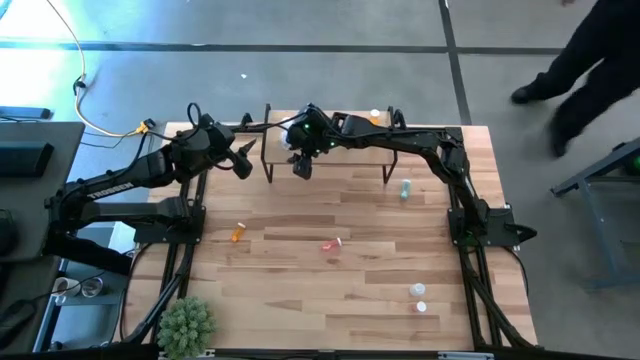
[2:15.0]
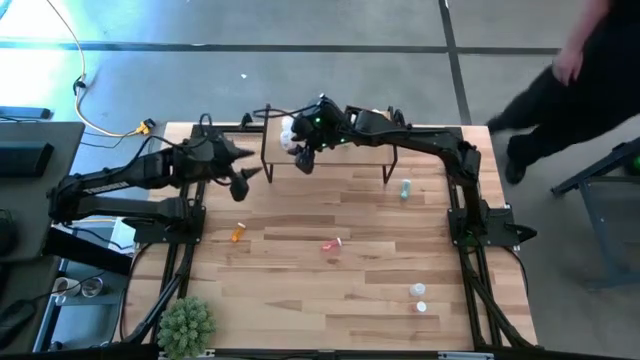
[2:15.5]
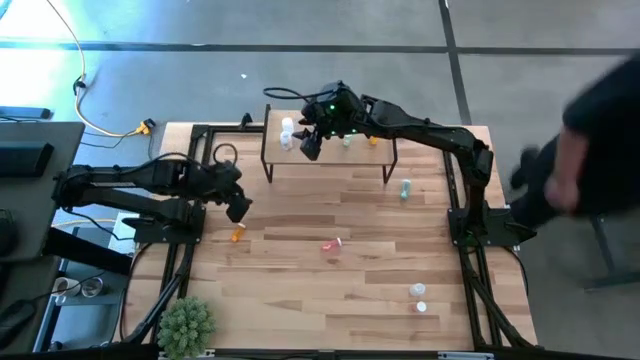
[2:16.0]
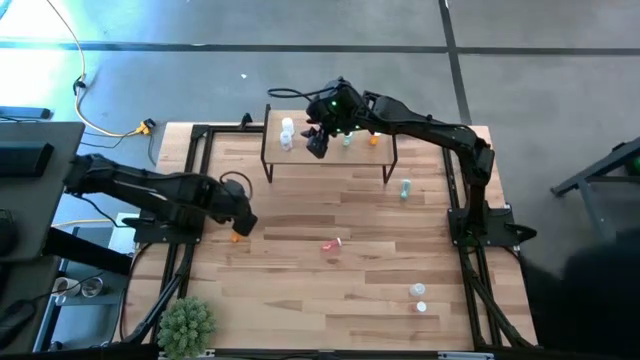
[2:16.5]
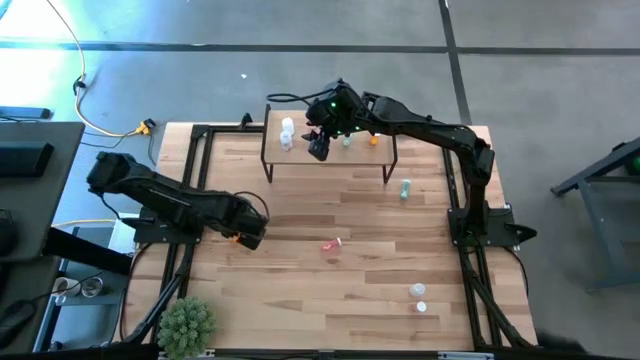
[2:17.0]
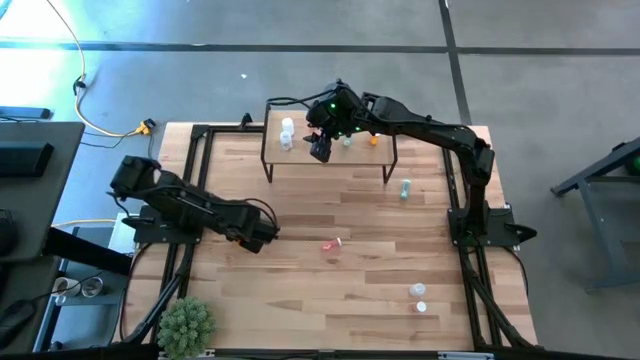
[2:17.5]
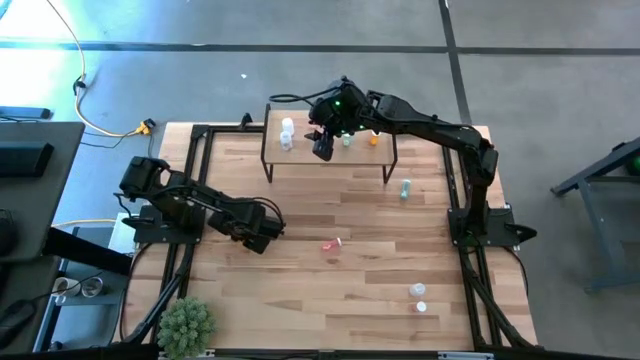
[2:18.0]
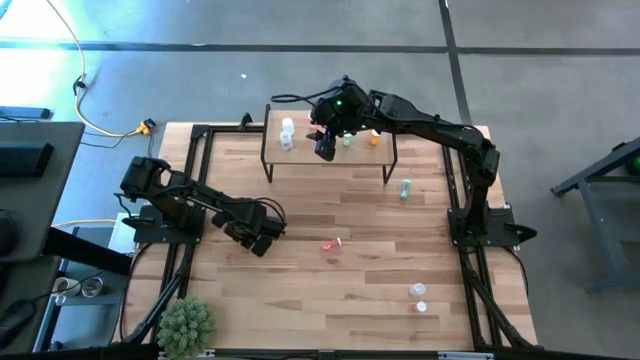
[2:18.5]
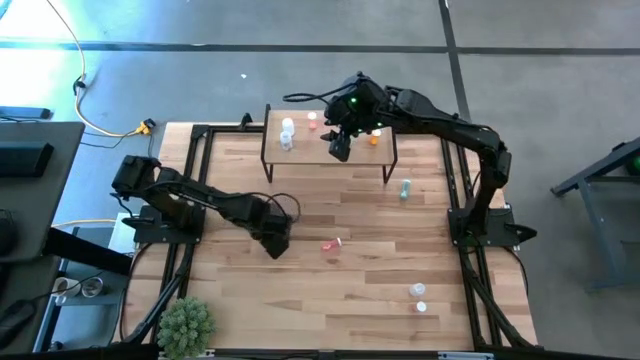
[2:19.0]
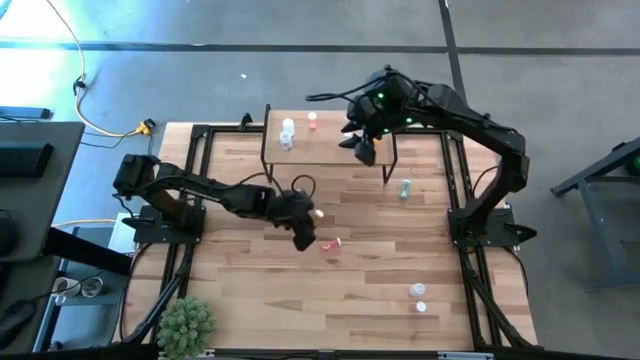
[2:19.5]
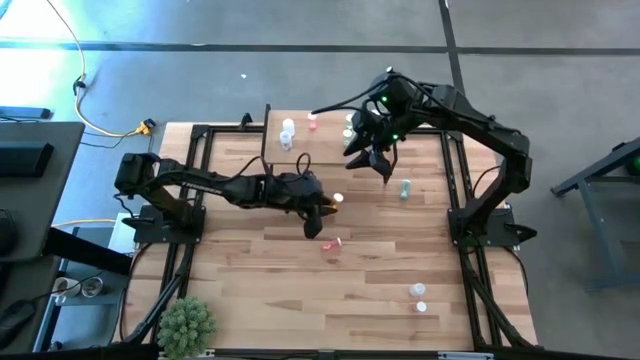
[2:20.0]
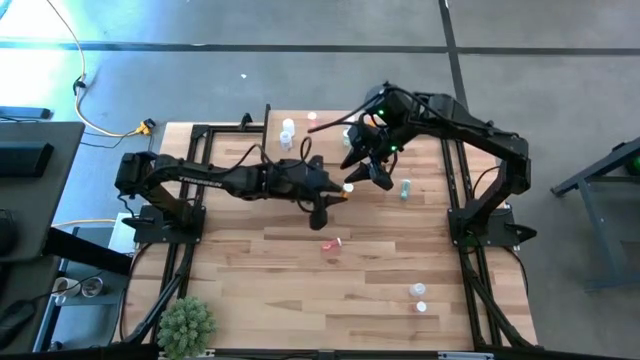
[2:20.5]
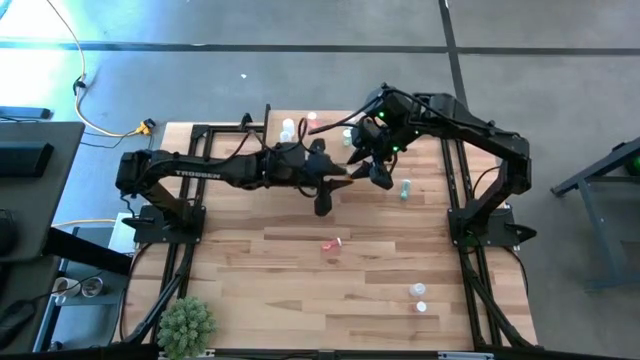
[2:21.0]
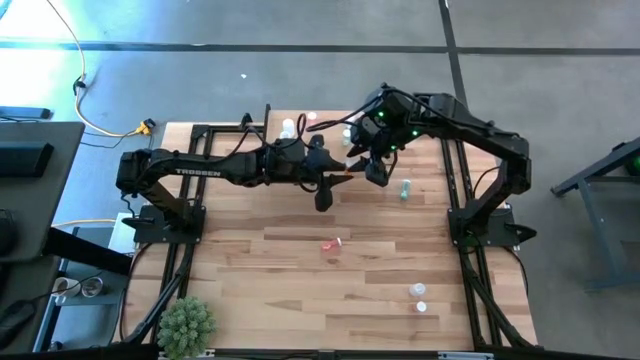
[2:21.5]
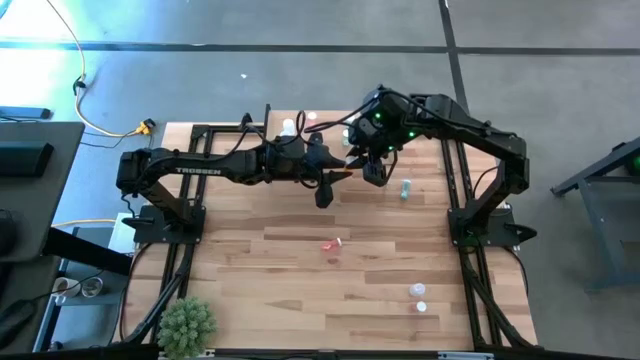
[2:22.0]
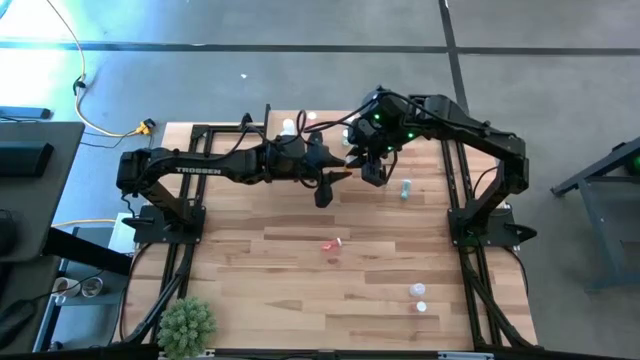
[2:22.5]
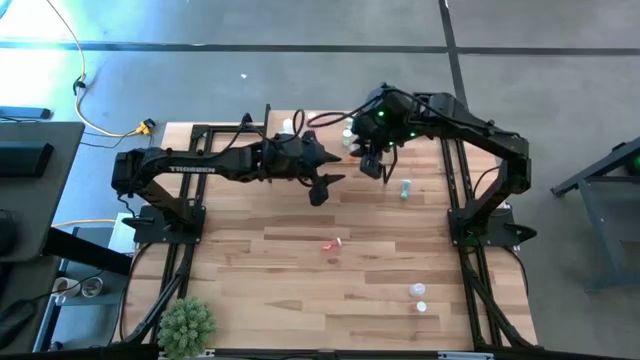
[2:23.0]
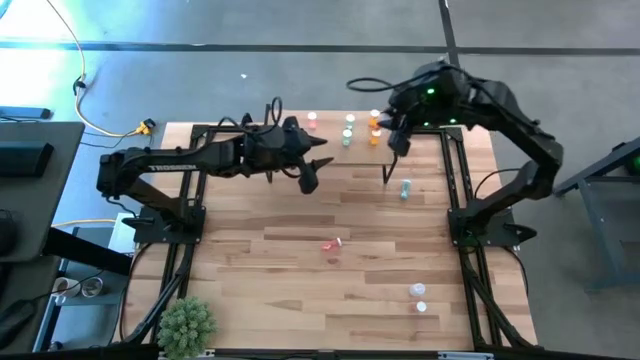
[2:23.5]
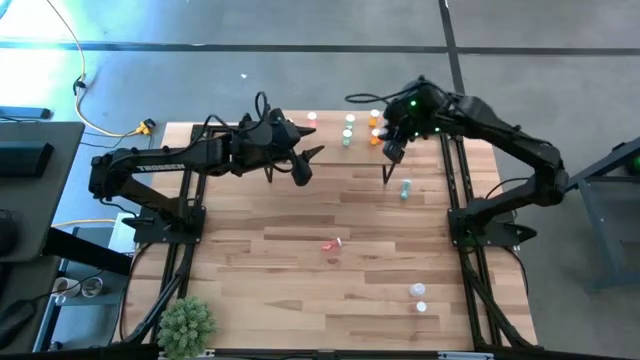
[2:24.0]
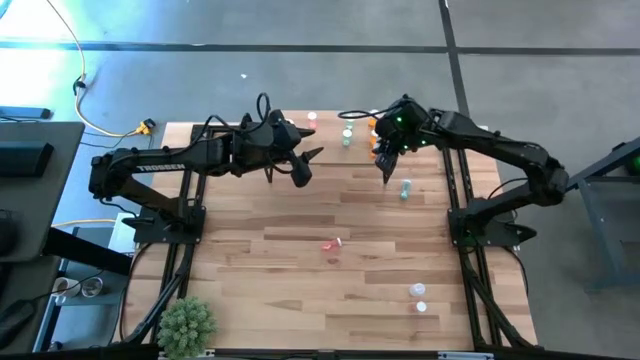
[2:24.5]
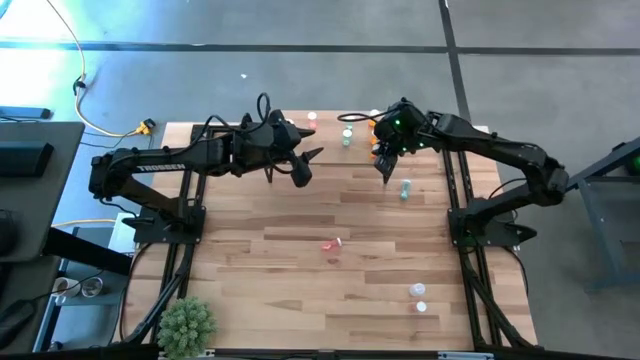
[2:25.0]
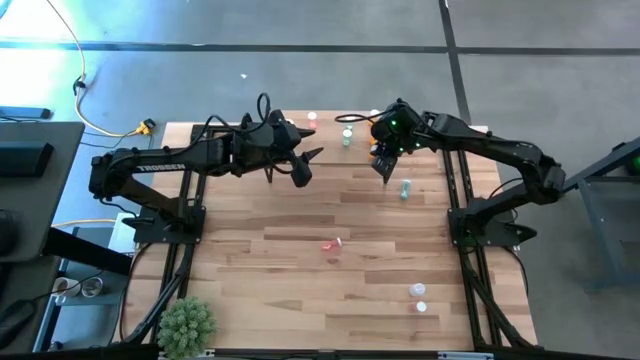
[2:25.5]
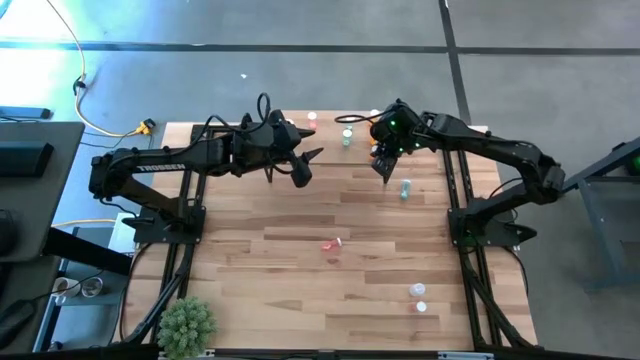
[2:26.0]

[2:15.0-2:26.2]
Task: Pick and place medicine bottles onto shelf by color
Put the yellow pill bottle on the shelf aligned with the other yellow pill bottles

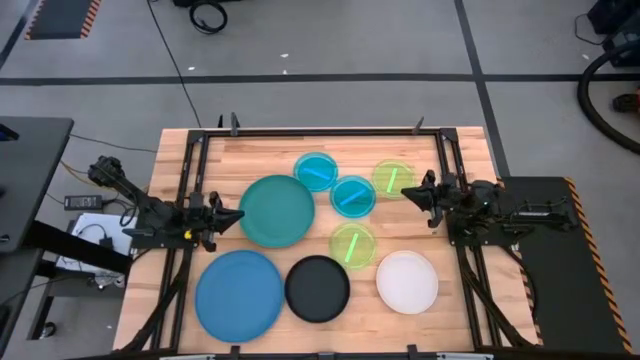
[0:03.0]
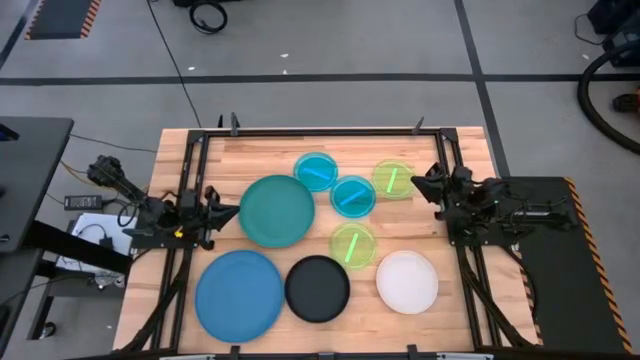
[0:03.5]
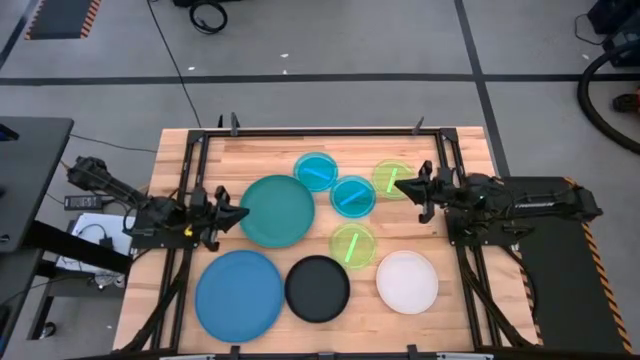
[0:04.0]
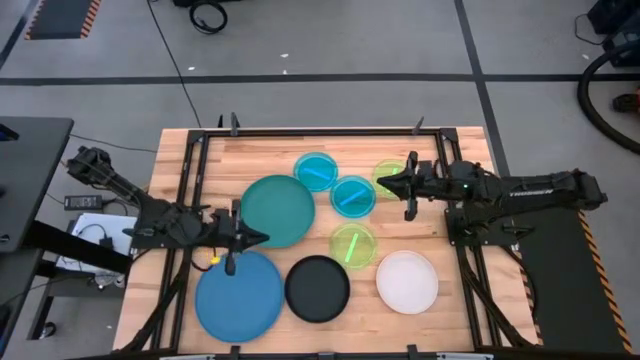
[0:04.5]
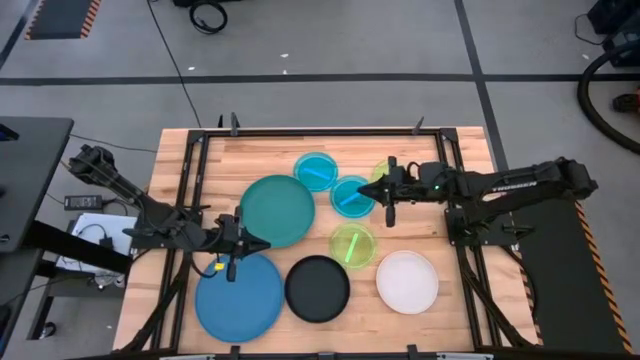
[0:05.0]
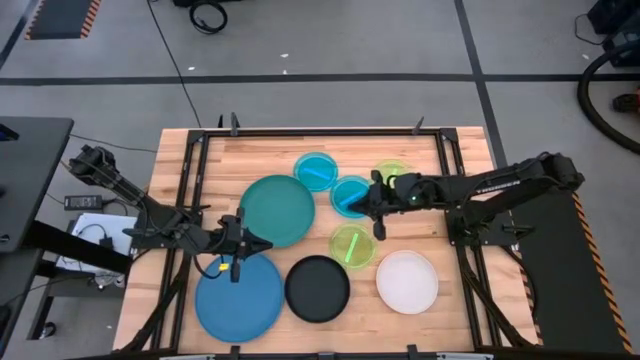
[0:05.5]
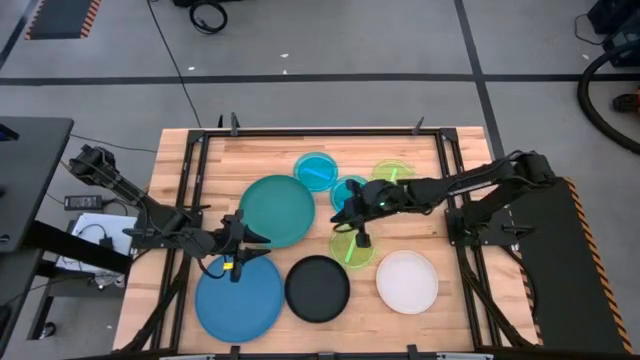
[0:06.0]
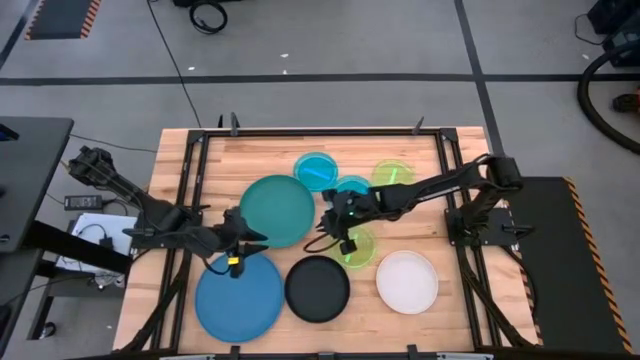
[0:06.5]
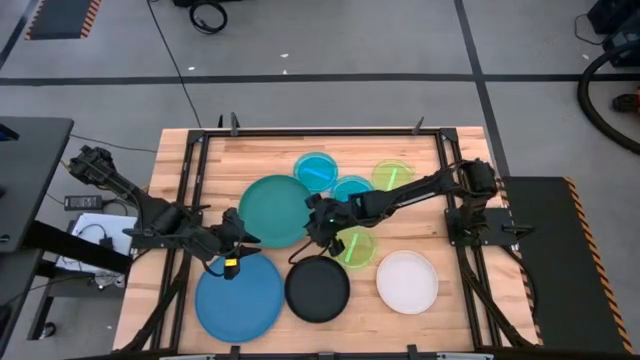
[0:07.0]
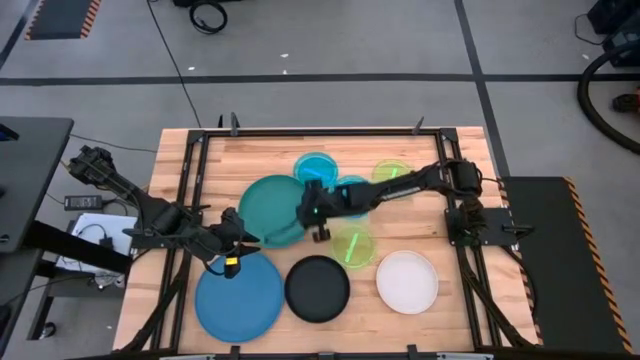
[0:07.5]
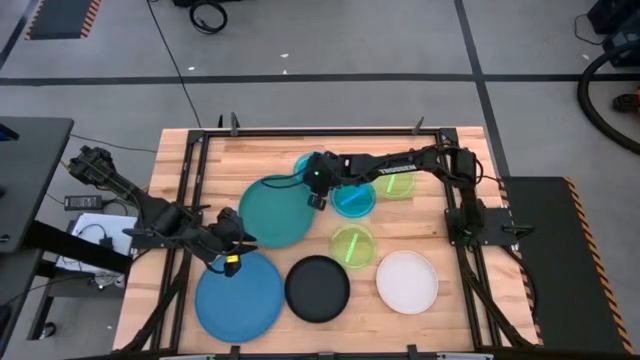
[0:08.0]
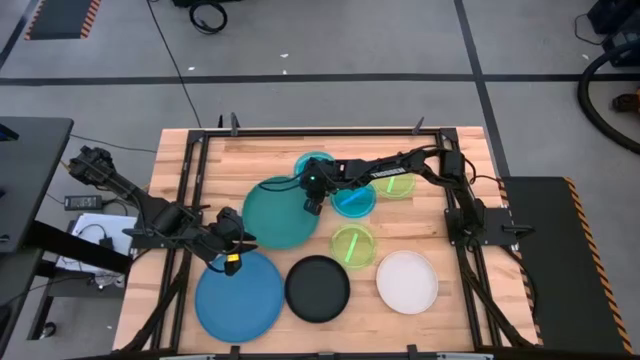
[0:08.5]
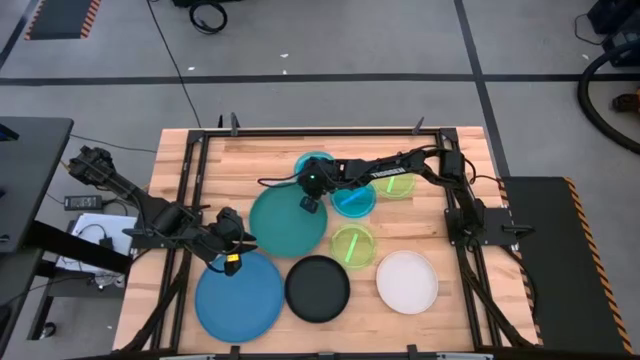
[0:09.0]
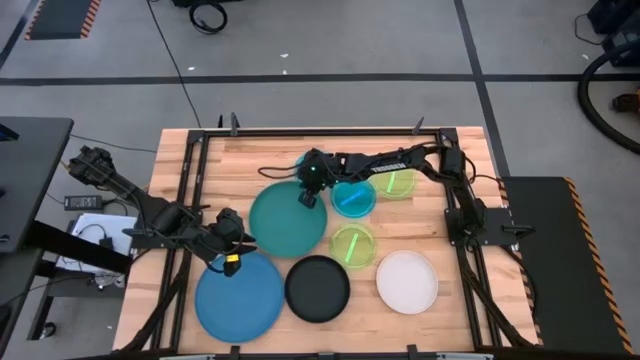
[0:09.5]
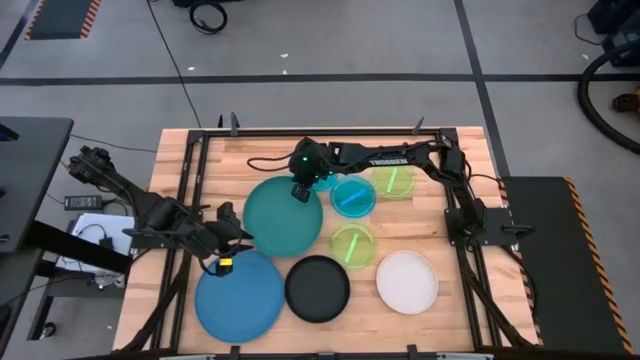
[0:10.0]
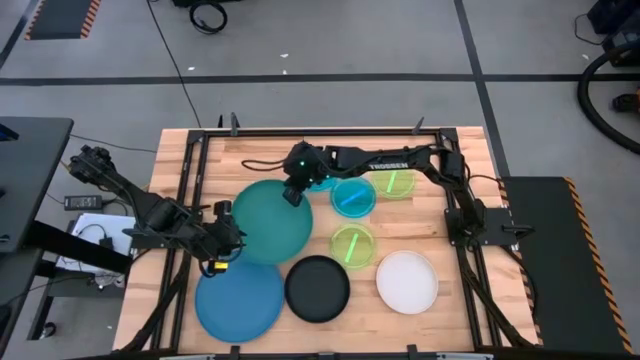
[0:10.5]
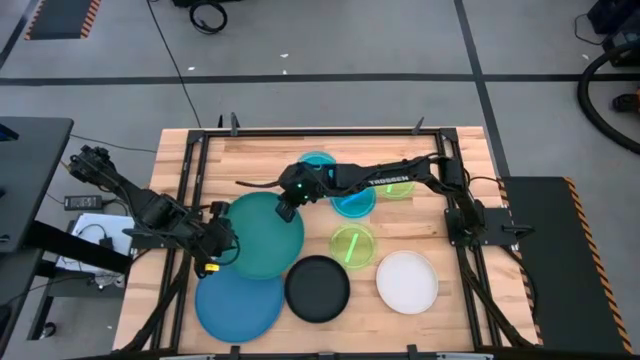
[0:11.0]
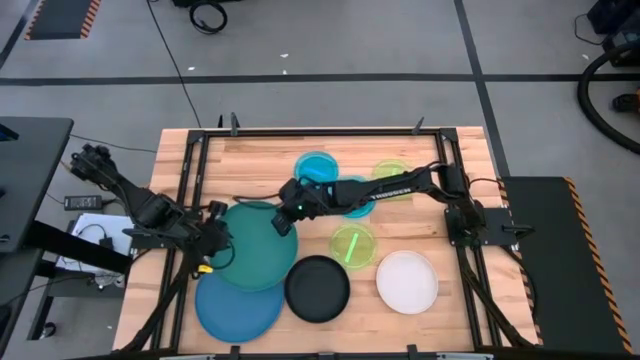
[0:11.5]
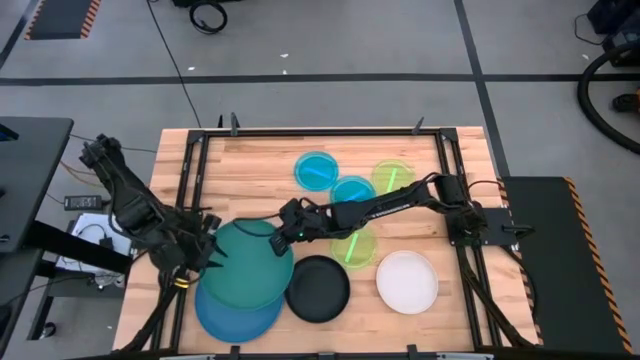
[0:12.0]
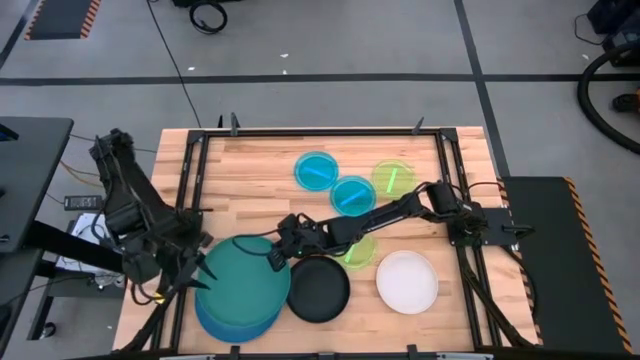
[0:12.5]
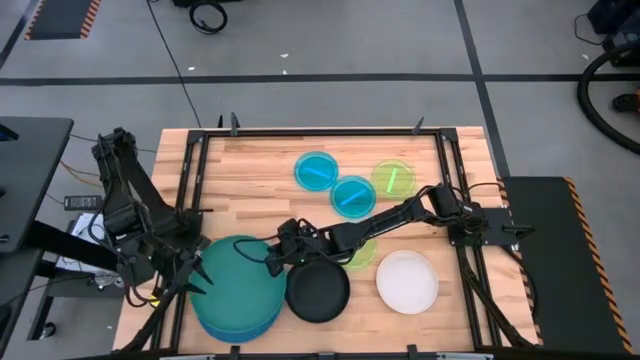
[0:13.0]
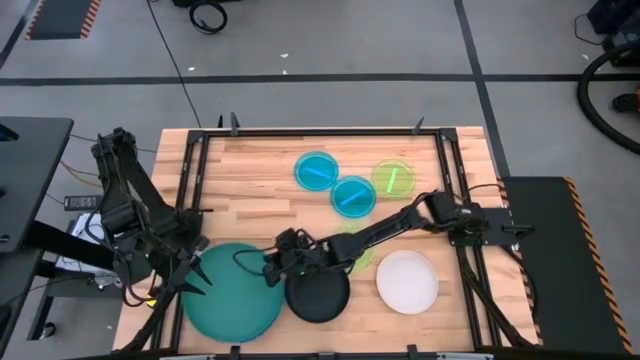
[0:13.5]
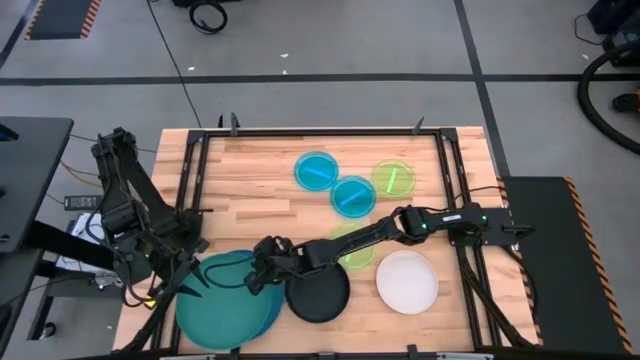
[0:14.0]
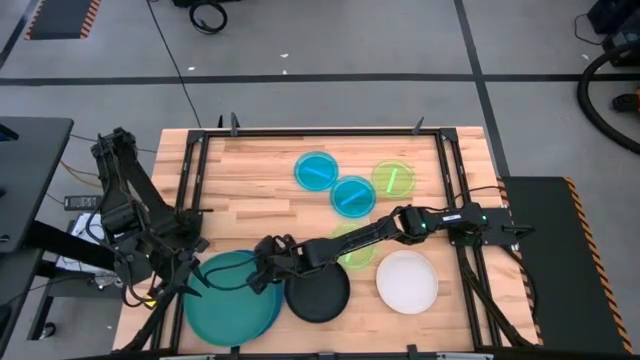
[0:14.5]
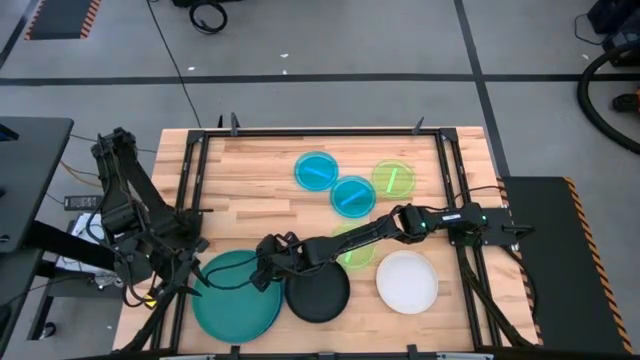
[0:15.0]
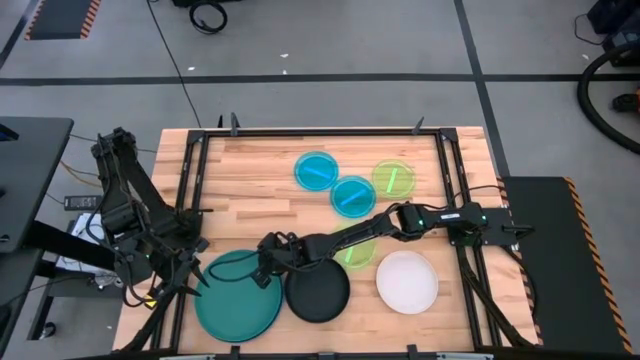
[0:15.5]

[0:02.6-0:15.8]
Task: Stack plastic plates
Stack the green plate on top of the blue plate
